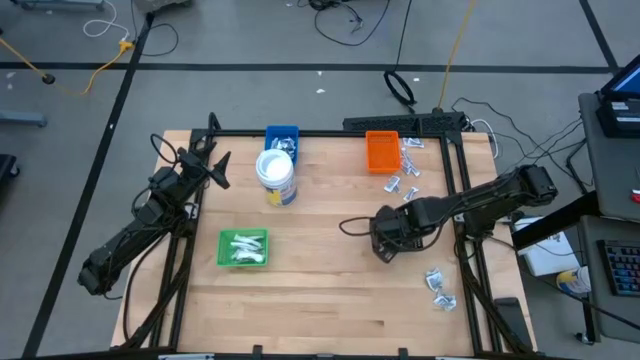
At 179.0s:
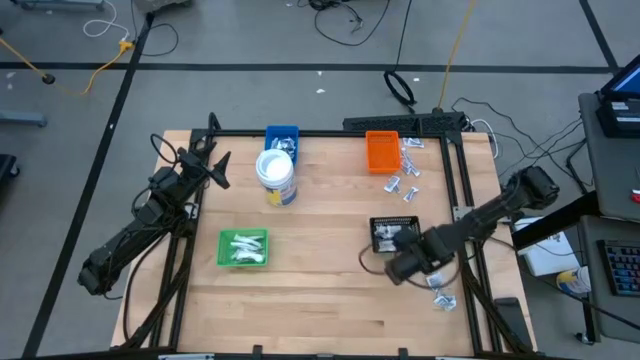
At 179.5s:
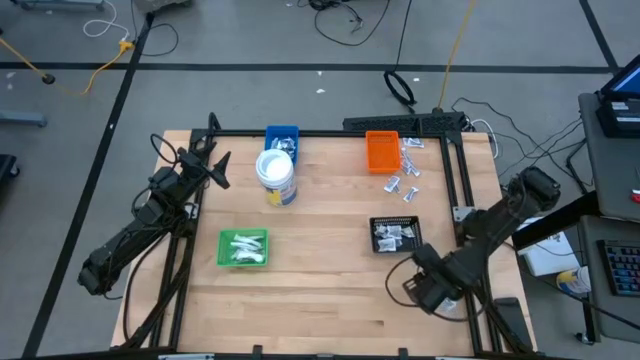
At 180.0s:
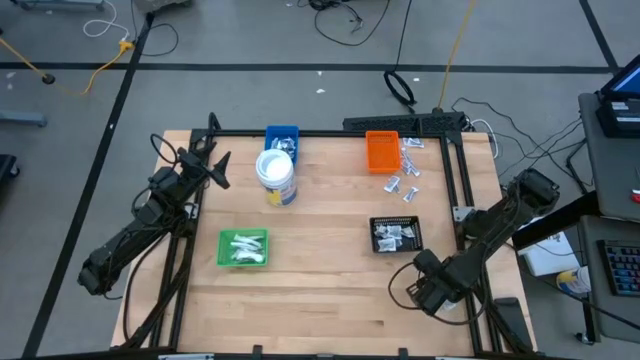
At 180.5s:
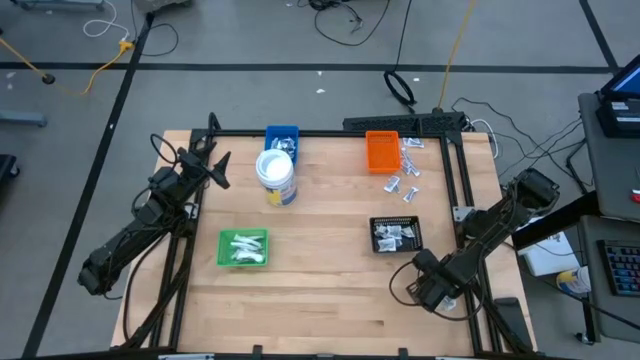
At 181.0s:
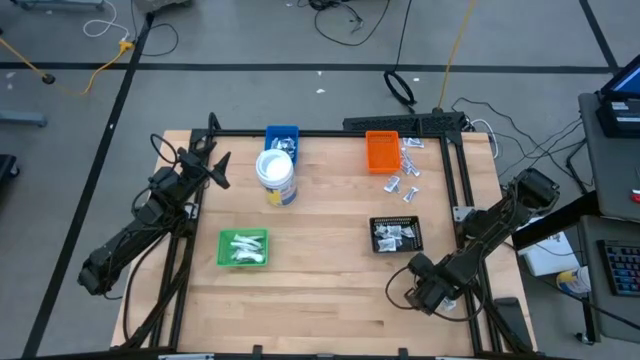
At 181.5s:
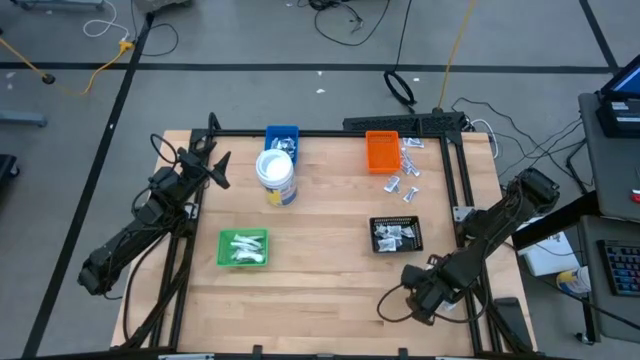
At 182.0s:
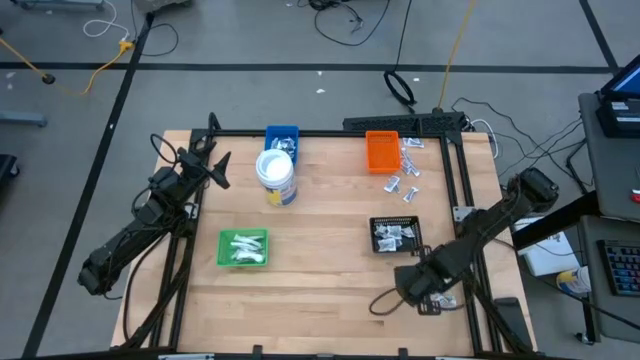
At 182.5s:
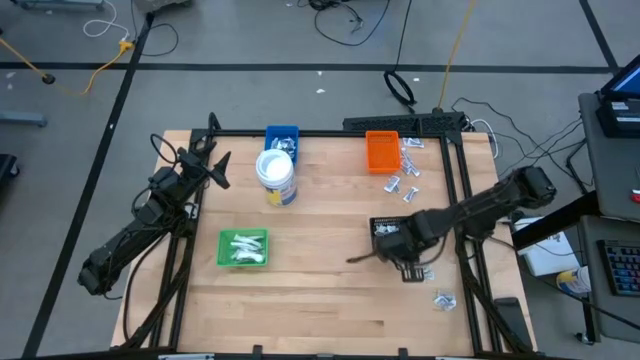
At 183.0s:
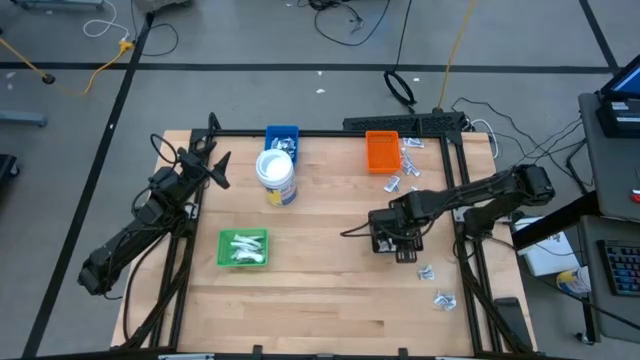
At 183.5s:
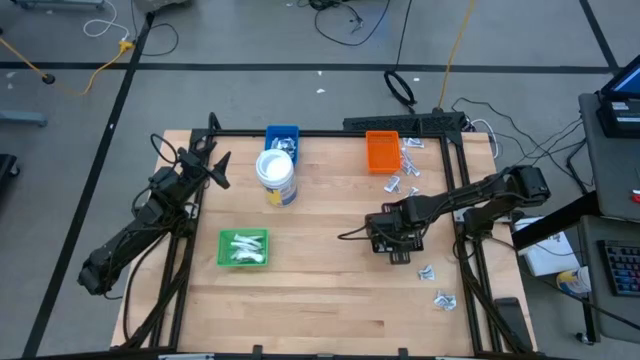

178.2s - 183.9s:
Task: Pick & Place First Aid Supplies
Put the gray towelette pack into the black bin

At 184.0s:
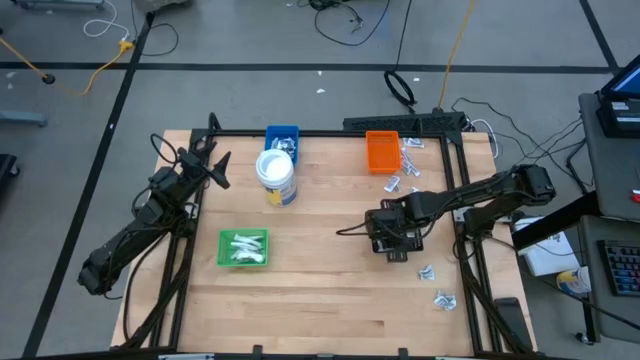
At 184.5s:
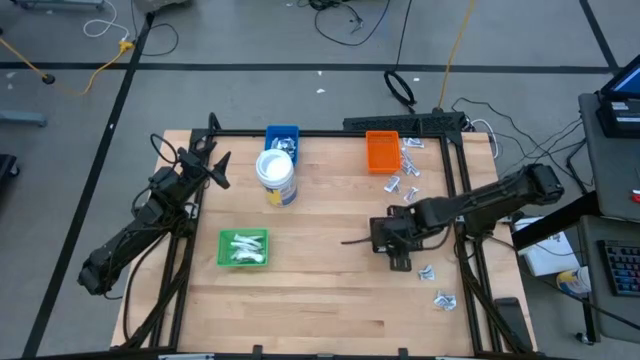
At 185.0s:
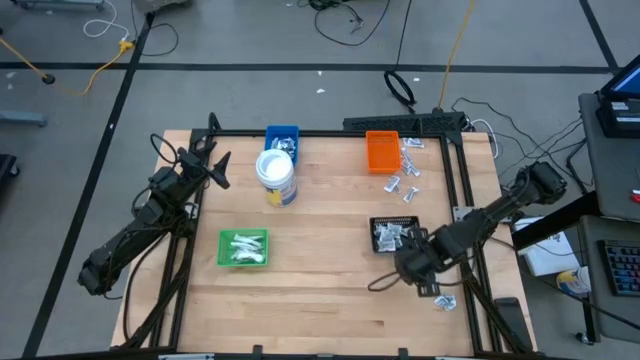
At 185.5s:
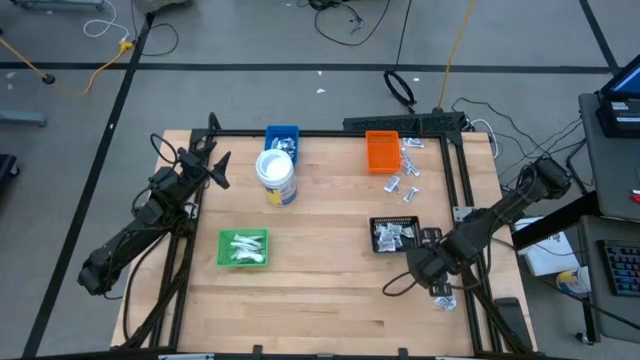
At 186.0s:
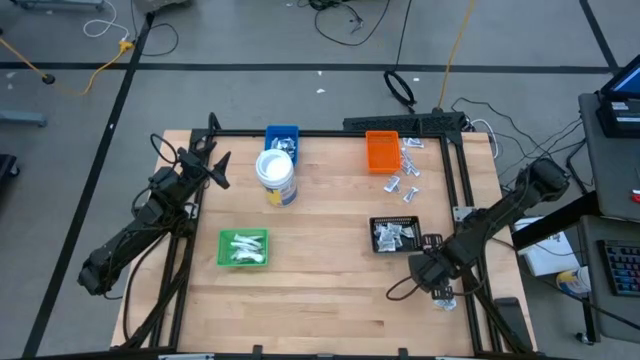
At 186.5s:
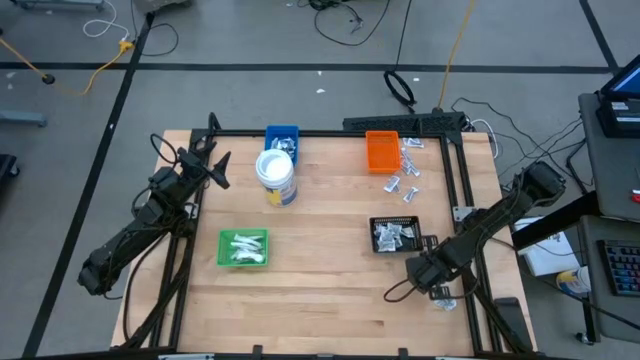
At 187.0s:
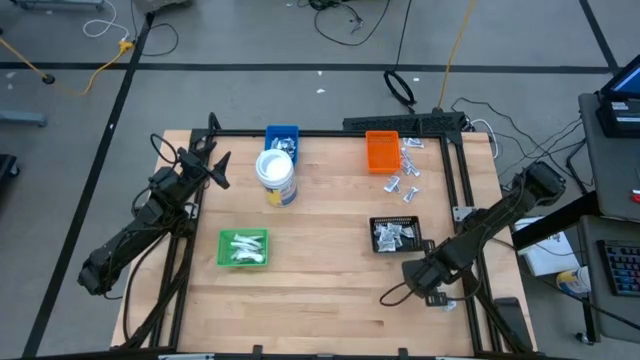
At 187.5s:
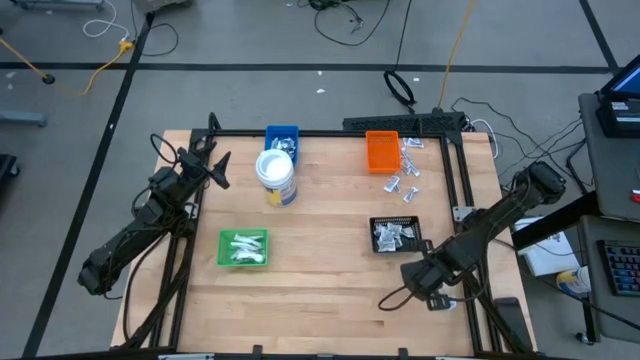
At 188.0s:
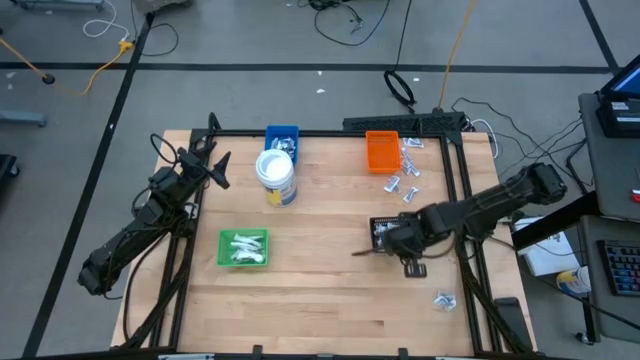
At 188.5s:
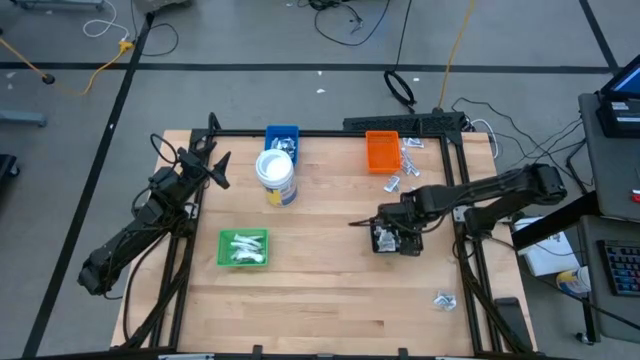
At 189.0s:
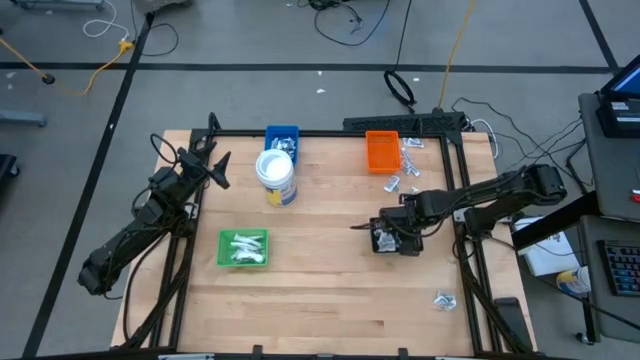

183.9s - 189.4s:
Put the gray towelette pack into the black bin

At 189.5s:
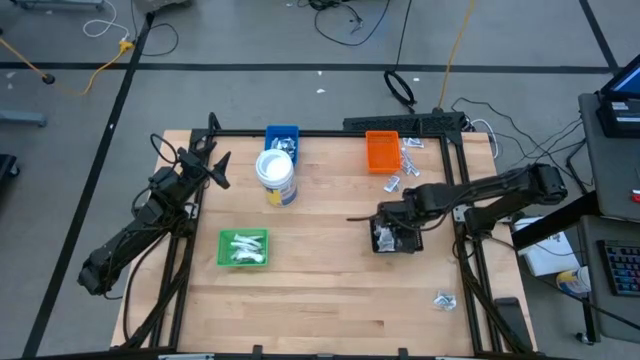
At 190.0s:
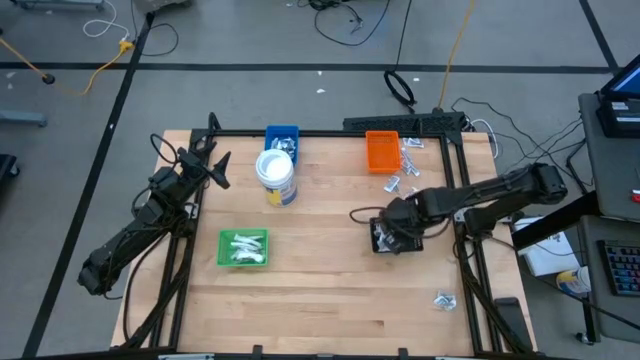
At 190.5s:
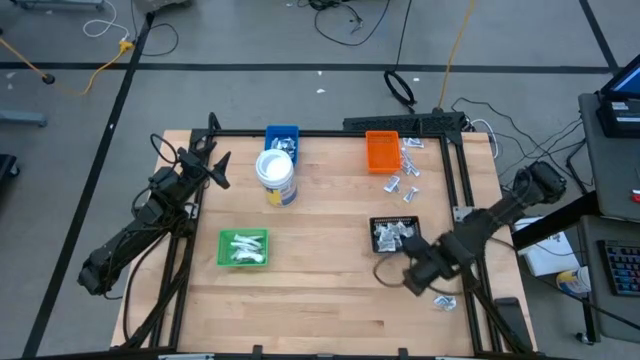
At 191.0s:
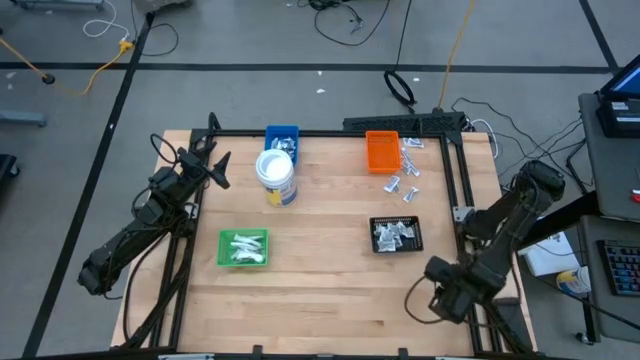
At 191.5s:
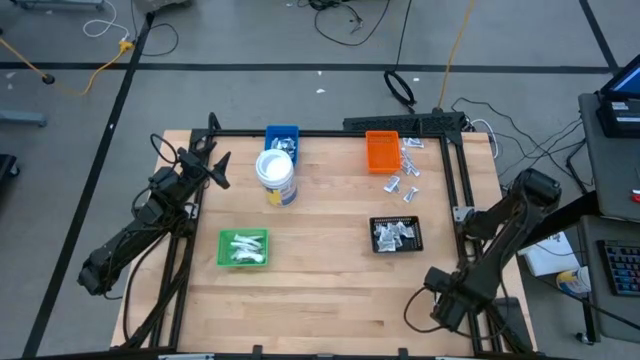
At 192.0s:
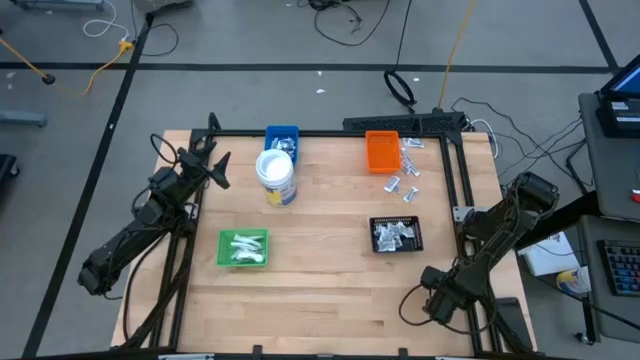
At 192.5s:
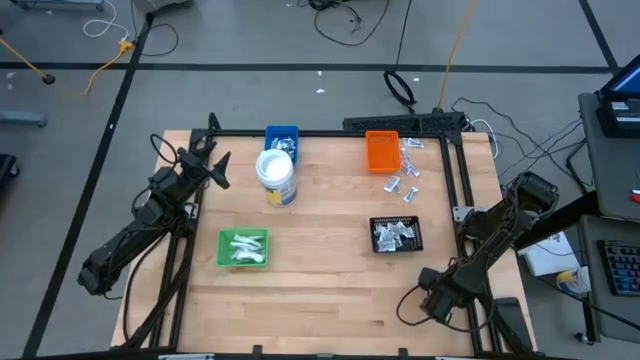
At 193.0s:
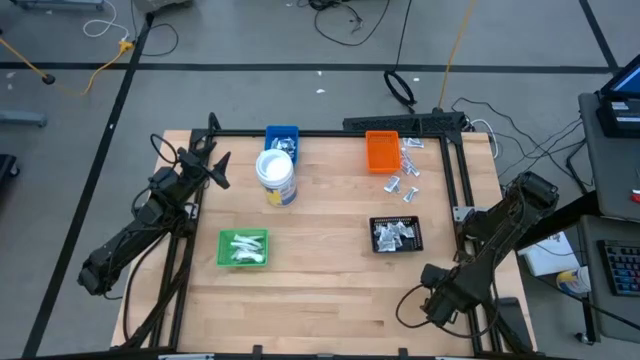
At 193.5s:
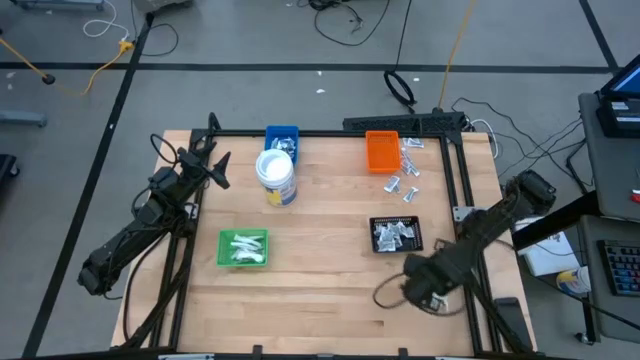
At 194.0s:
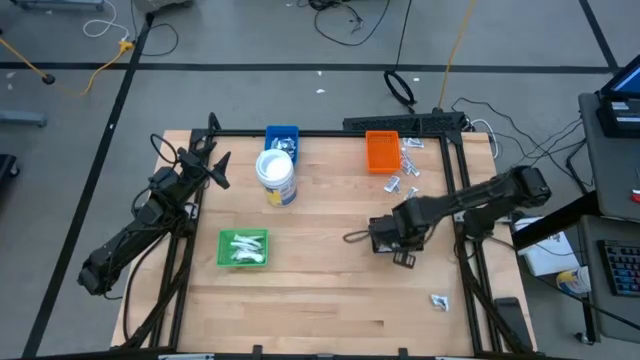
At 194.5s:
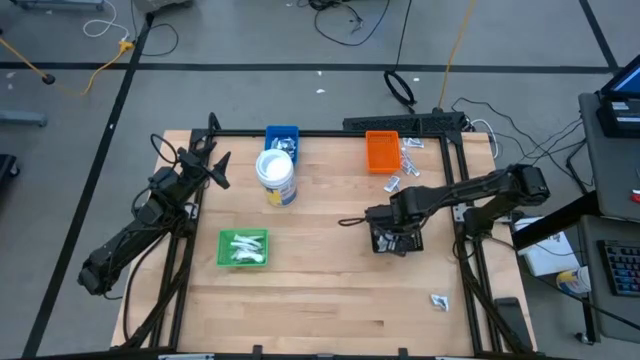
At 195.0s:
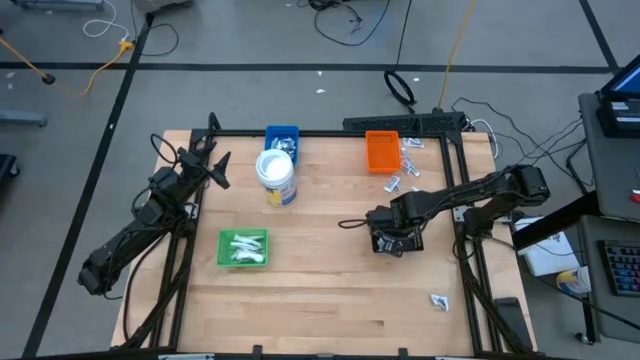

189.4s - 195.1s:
Put the gray towelette pack into the black bin

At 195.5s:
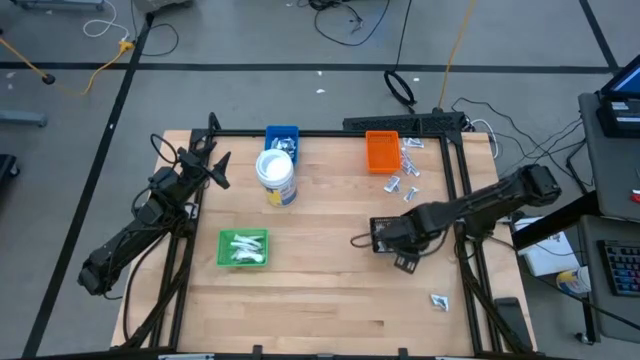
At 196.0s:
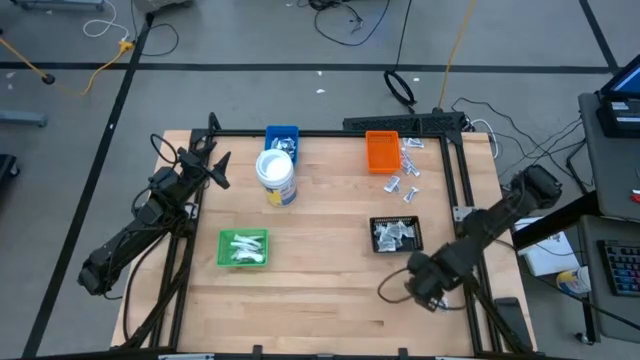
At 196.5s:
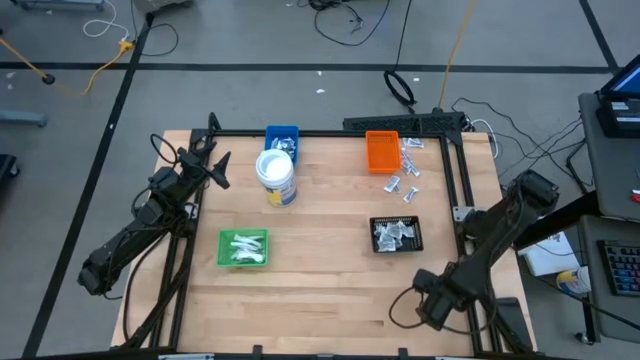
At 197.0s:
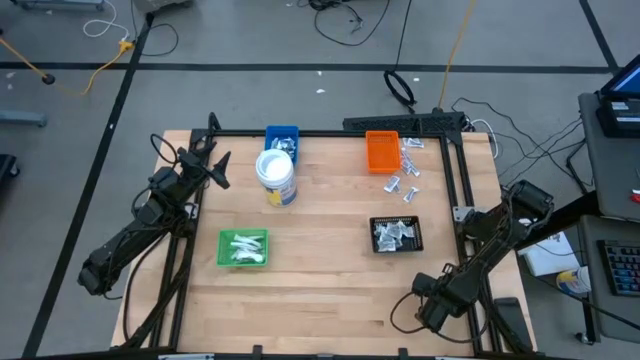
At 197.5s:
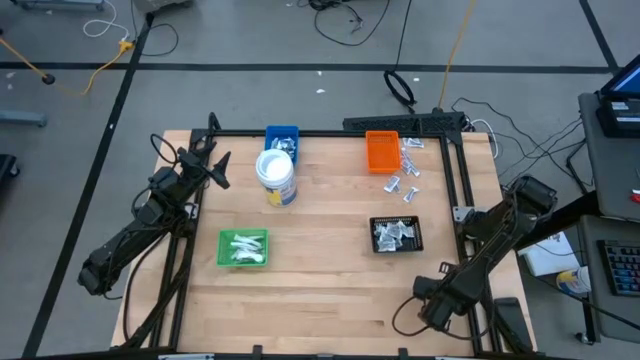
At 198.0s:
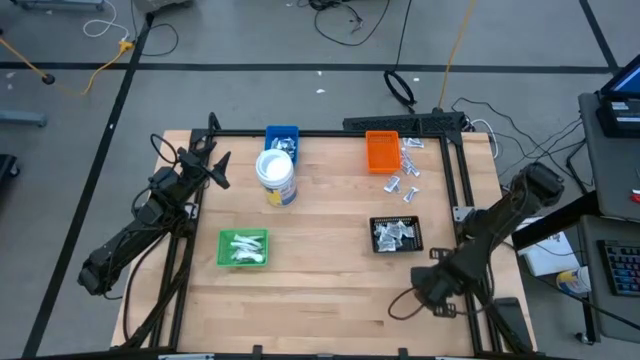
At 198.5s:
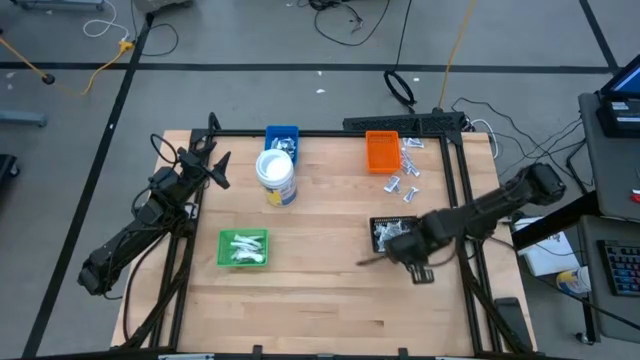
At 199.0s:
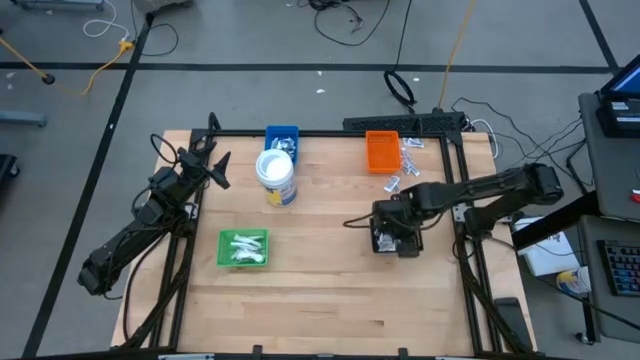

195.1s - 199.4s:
Put the gray towelette pack into the black bin
